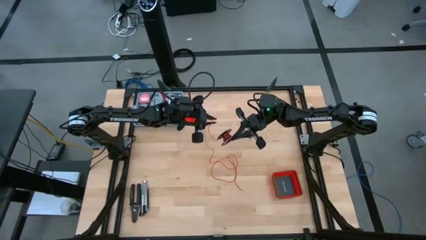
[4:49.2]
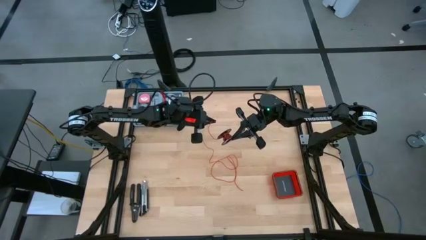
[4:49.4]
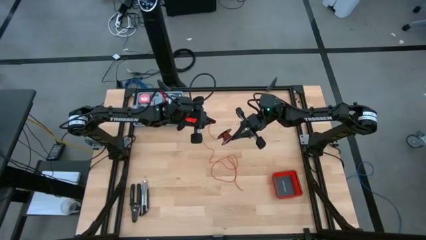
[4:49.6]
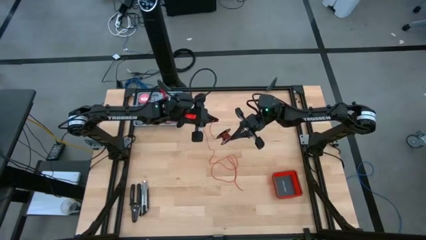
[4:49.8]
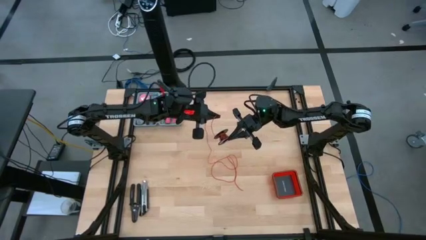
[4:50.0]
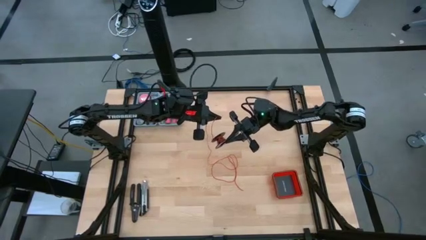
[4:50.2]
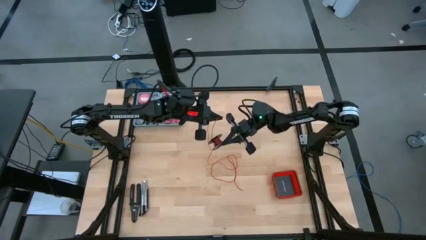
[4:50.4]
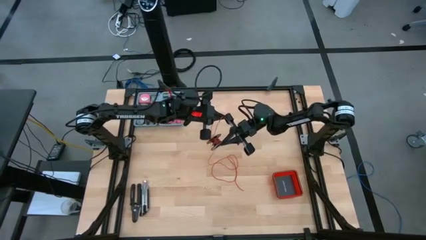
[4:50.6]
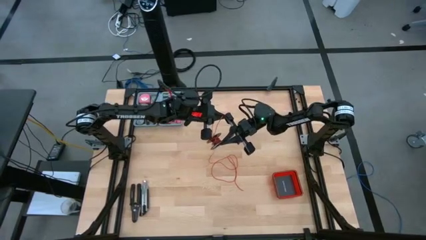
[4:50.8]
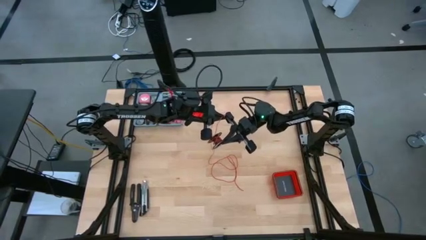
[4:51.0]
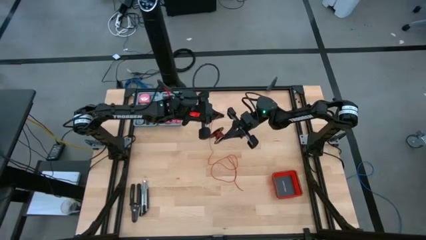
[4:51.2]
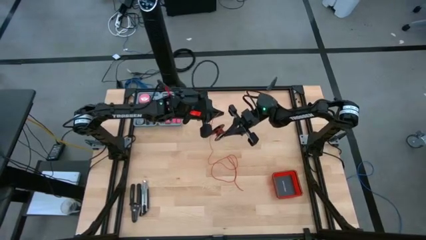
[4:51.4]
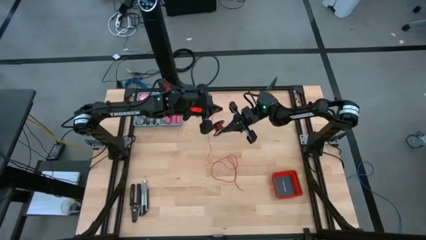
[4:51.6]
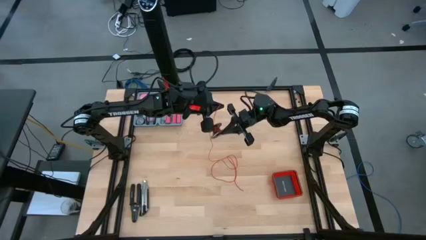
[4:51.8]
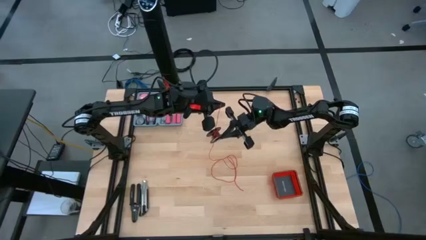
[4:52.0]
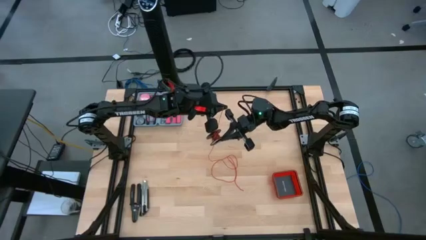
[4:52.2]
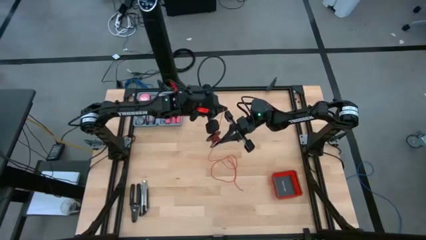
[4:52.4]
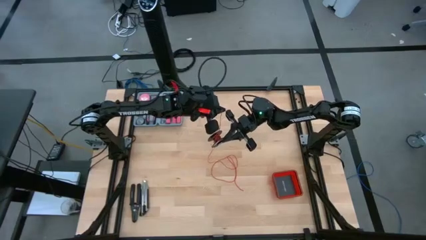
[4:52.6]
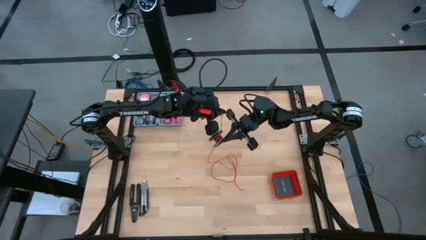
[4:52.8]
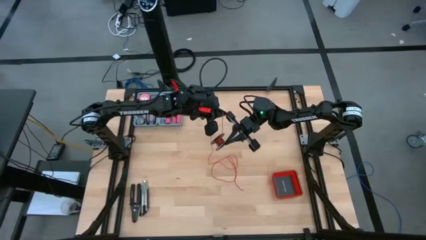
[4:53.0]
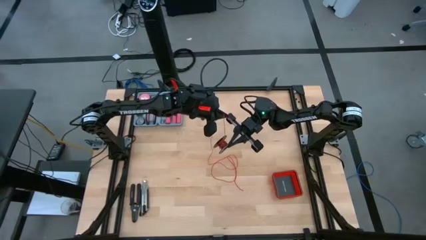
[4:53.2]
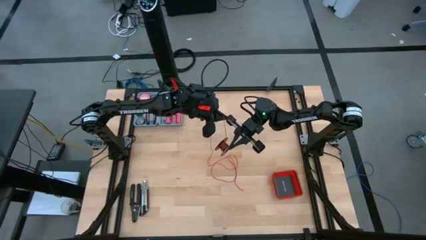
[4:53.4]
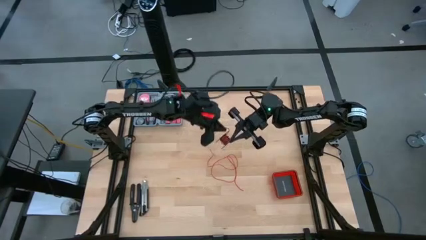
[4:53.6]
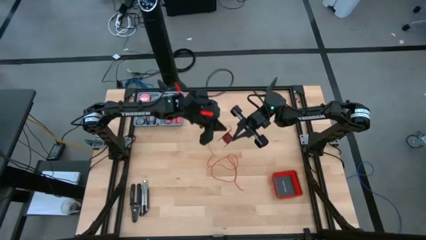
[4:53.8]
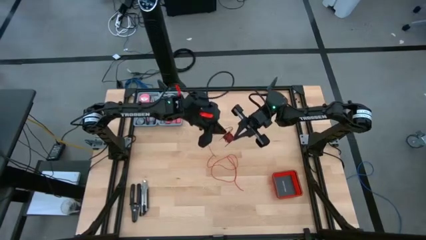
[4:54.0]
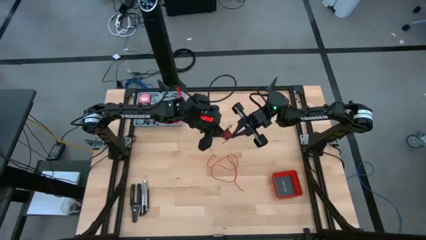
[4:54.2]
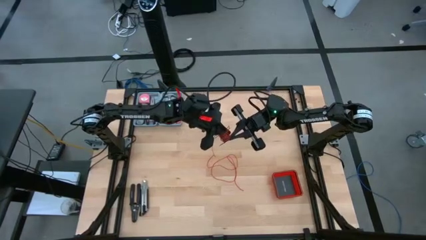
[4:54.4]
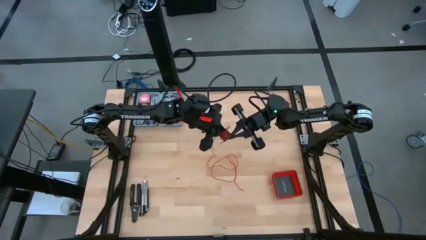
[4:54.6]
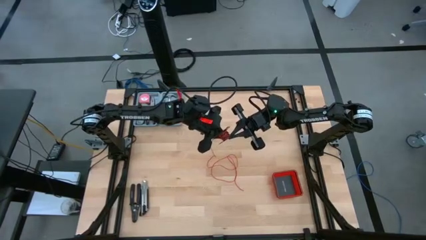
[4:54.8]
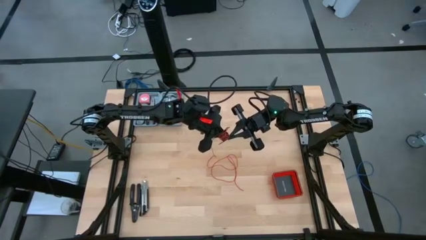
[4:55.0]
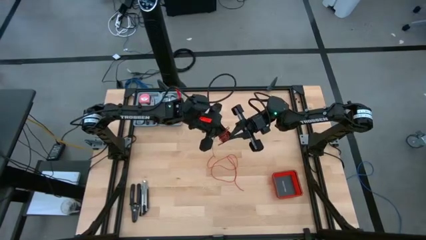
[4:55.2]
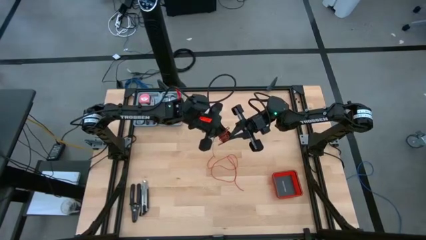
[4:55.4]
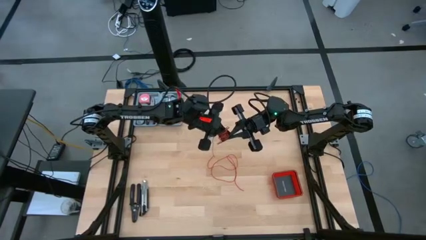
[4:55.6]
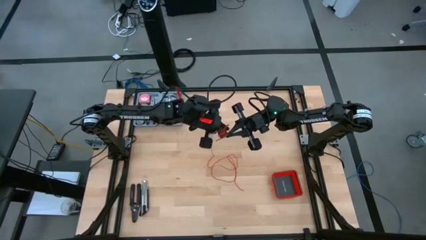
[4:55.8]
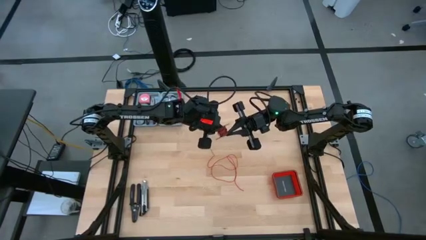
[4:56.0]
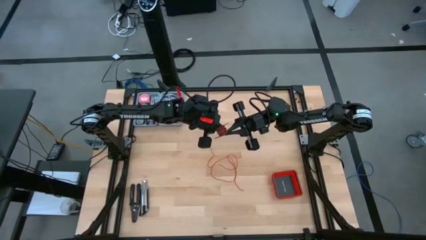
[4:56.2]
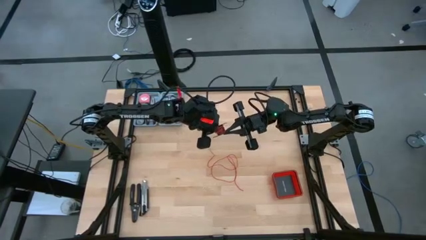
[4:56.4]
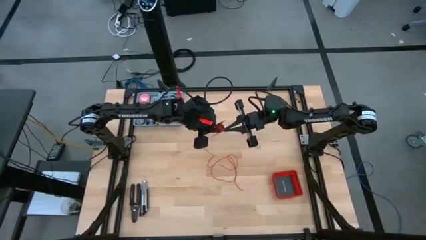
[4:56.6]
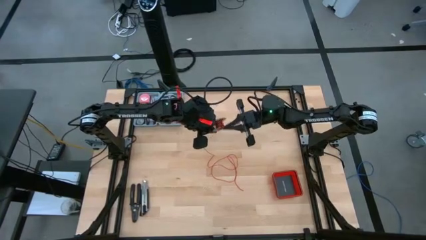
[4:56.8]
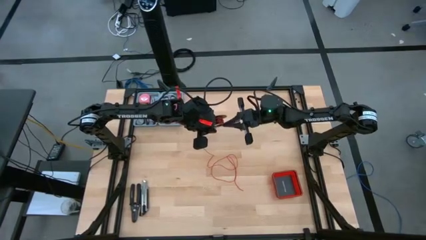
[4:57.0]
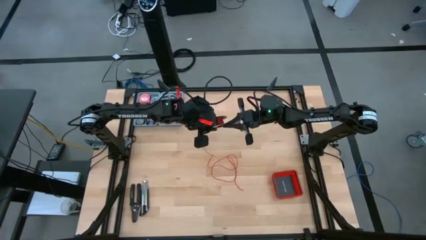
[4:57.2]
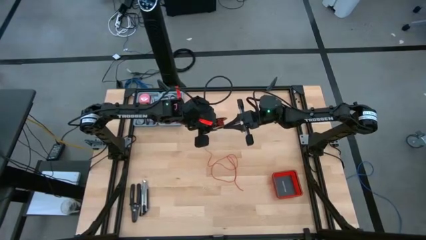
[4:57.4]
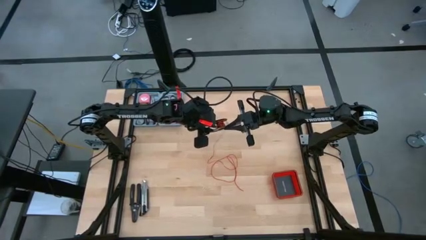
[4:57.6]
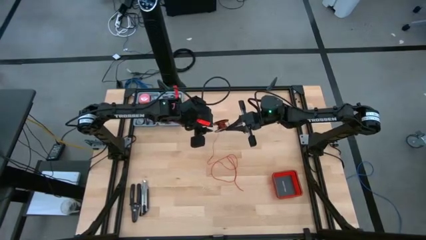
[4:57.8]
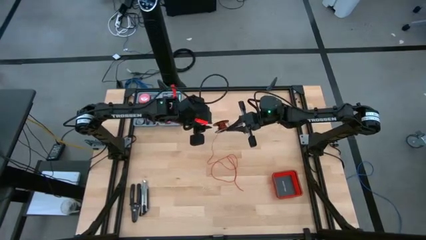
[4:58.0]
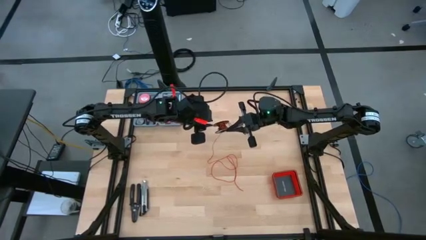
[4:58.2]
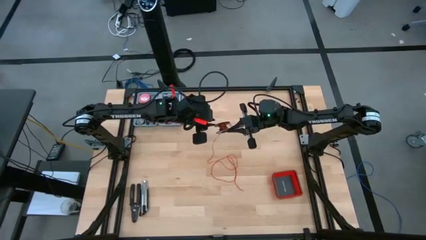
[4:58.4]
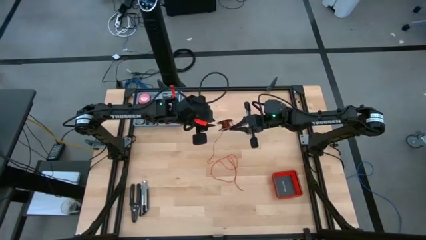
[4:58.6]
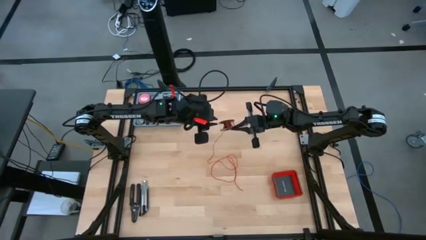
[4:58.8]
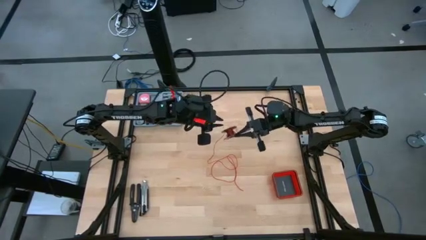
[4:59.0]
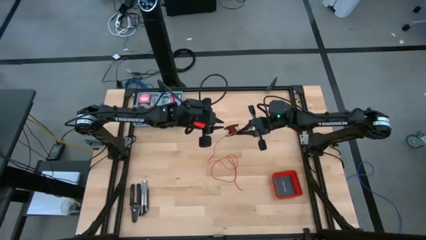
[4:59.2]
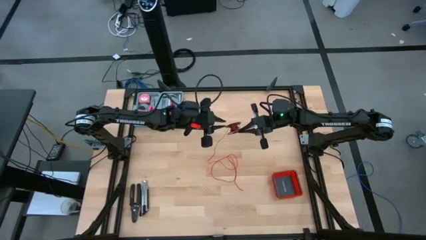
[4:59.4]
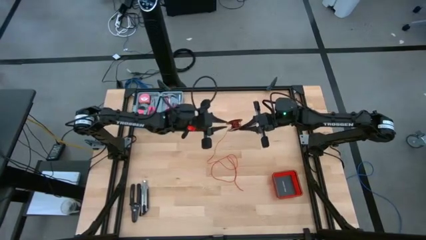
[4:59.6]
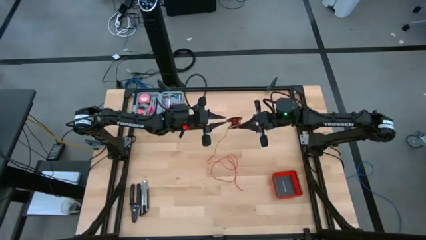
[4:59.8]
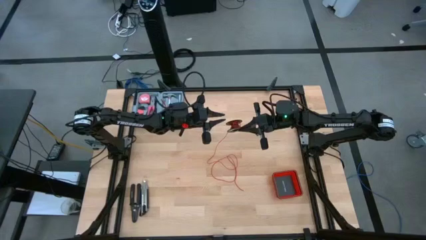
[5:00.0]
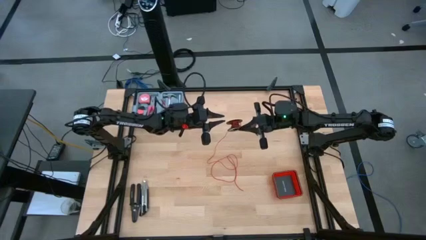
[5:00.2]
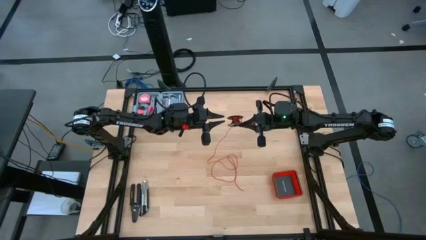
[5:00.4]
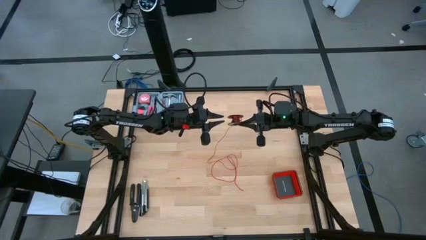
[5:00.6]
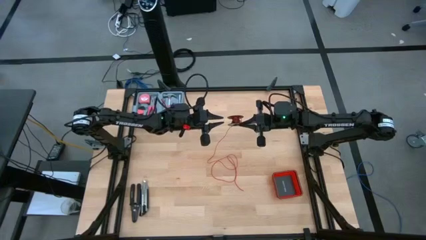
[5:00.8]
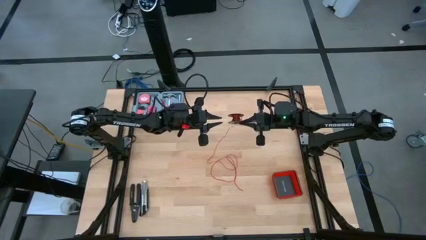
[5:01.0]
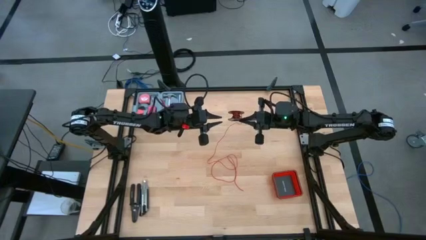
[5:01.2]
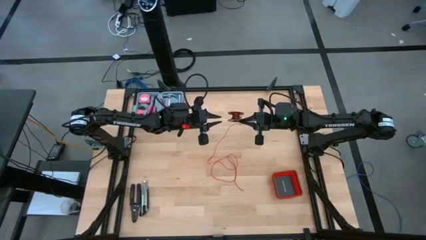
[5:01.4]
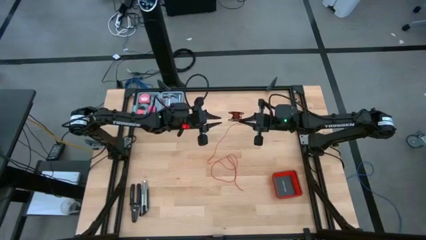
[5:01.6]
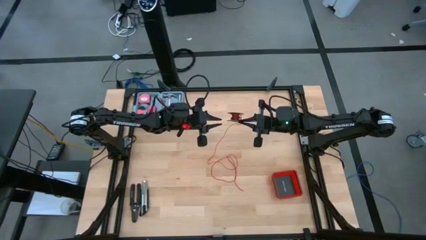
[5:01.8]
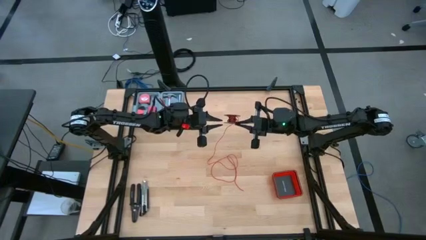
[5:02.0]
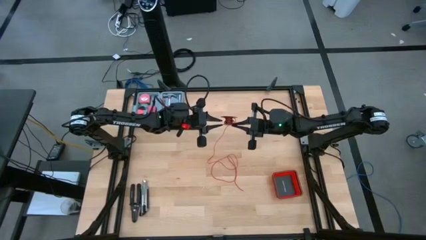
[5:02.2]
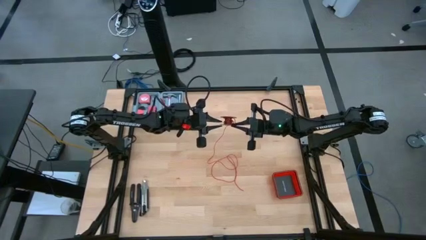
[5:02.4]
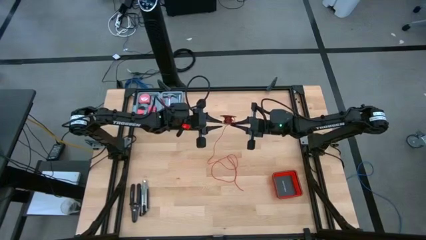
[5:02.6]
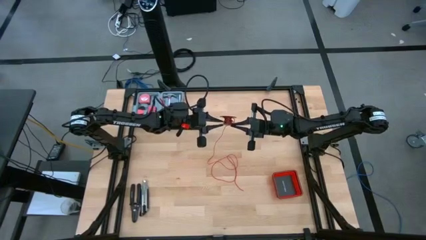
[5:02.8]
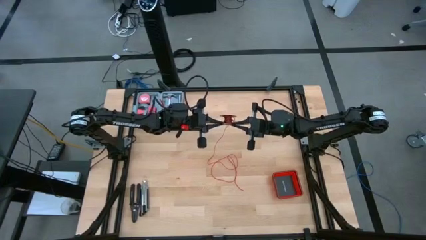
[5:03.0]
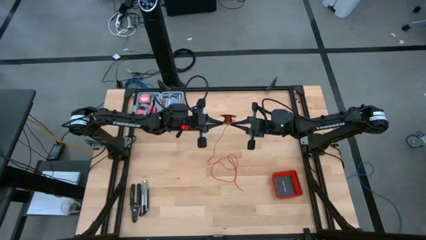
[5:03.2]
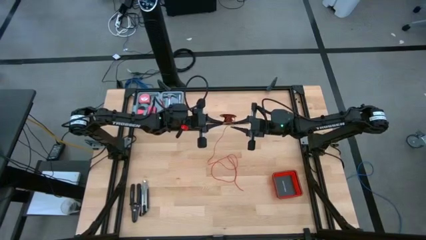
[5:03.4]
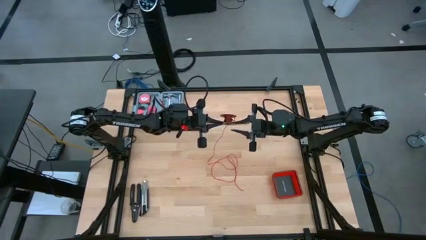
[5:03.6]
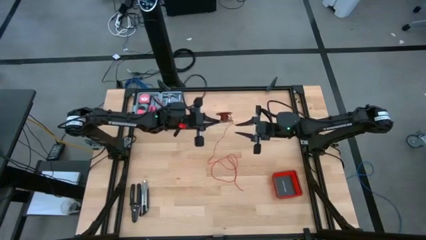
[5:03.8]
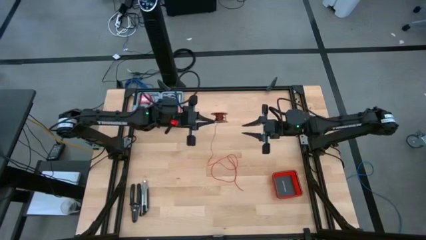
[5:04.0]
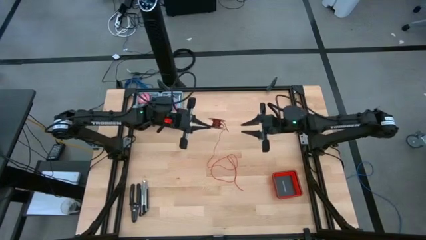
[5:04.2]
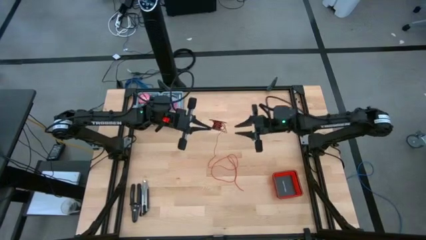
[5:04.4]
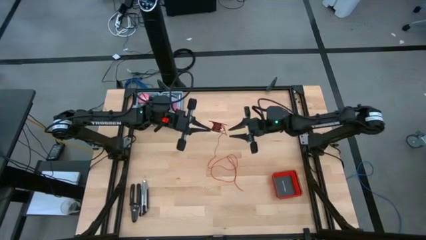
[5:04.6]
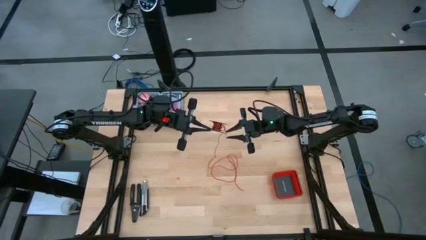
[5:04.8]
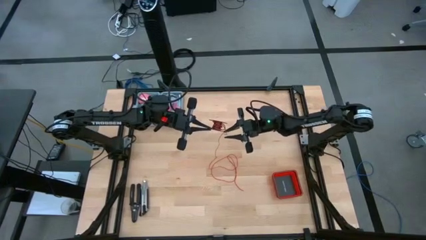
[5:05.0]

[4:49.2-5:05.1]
Task: Coil cords
Coil the red wire onto the spool
